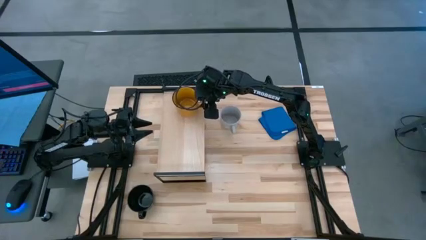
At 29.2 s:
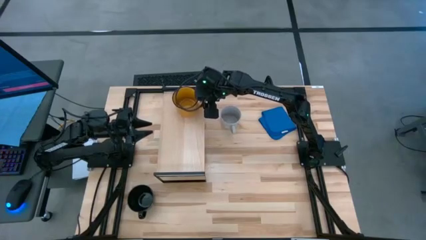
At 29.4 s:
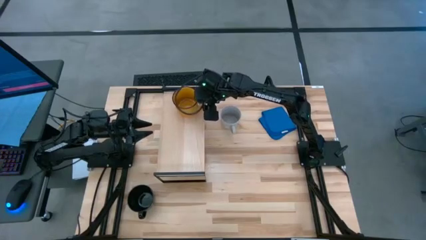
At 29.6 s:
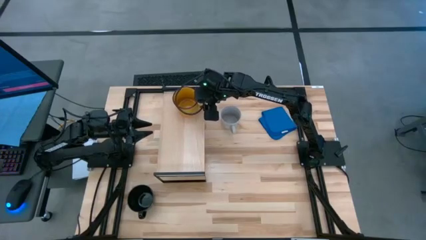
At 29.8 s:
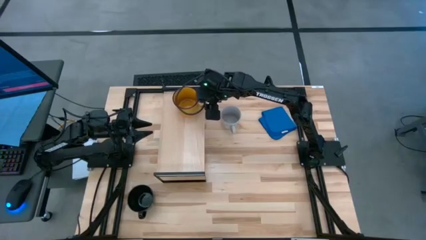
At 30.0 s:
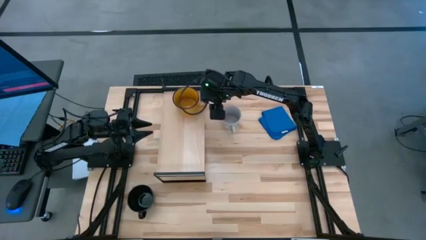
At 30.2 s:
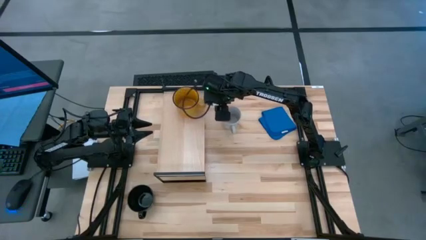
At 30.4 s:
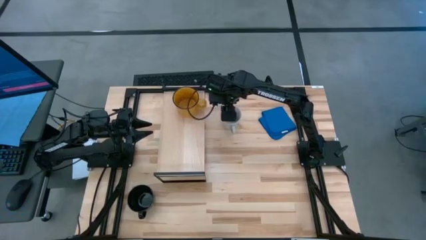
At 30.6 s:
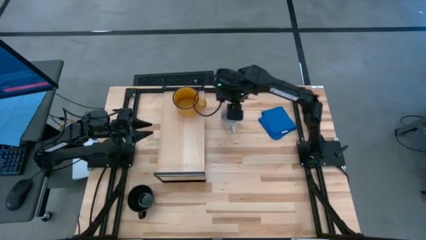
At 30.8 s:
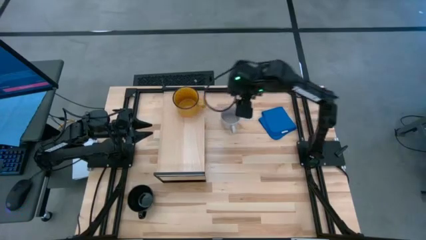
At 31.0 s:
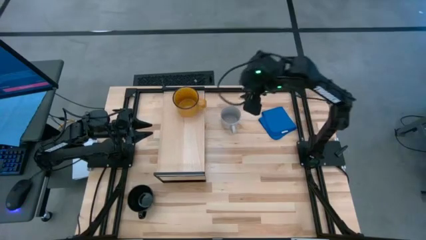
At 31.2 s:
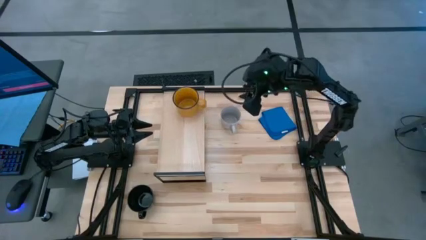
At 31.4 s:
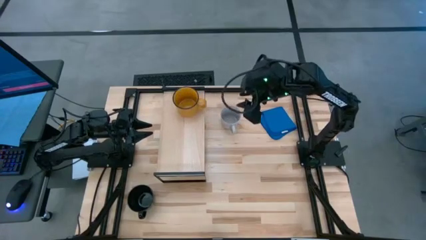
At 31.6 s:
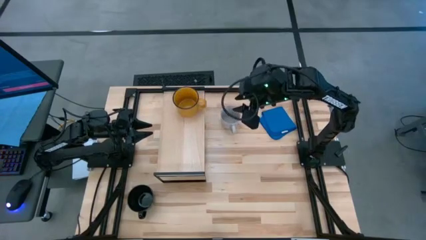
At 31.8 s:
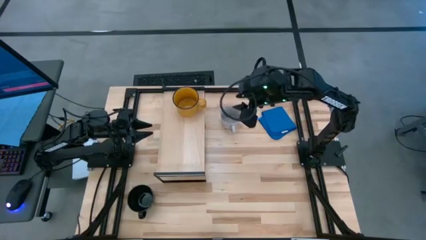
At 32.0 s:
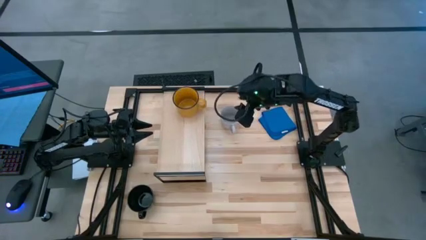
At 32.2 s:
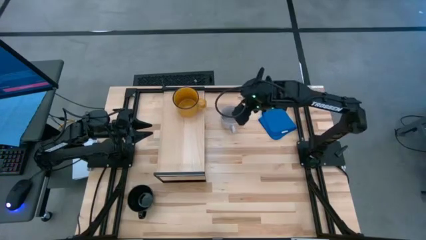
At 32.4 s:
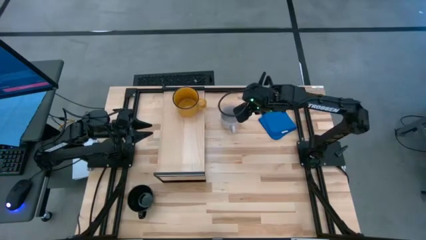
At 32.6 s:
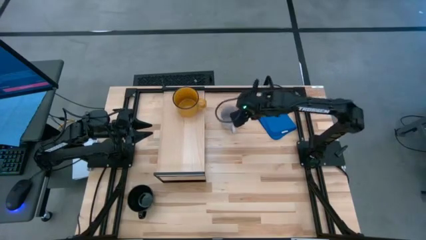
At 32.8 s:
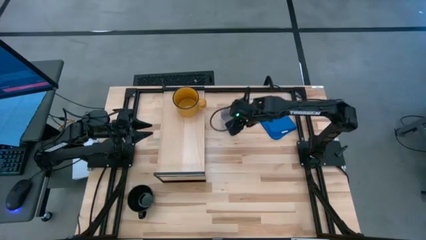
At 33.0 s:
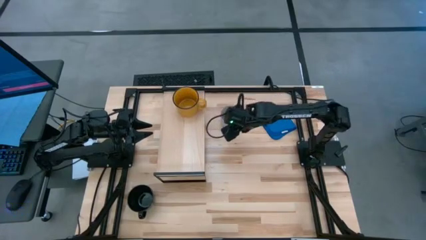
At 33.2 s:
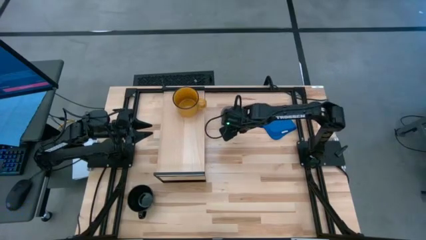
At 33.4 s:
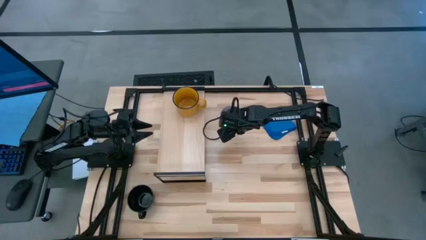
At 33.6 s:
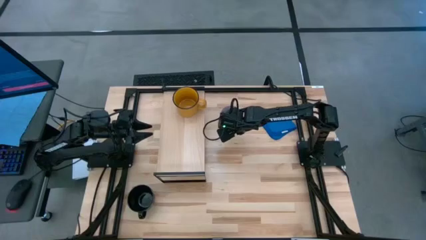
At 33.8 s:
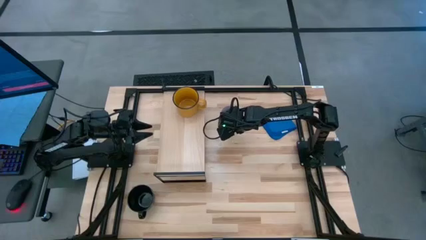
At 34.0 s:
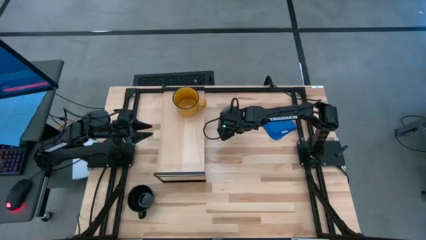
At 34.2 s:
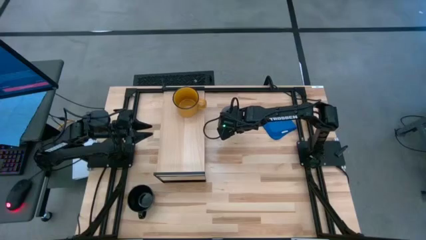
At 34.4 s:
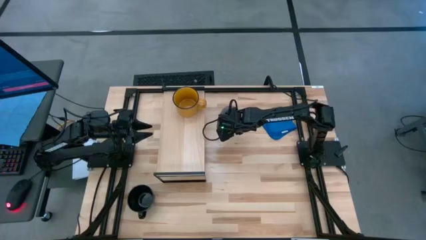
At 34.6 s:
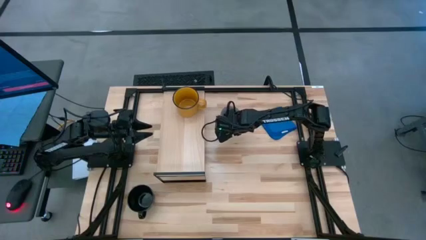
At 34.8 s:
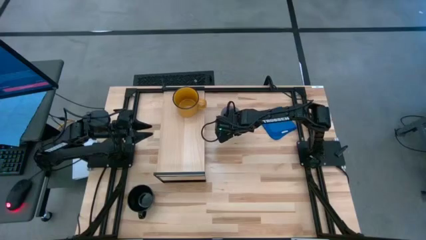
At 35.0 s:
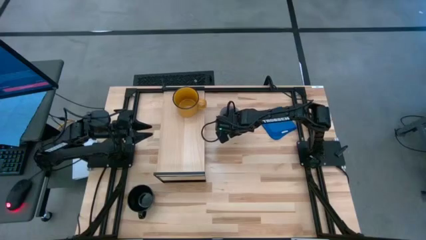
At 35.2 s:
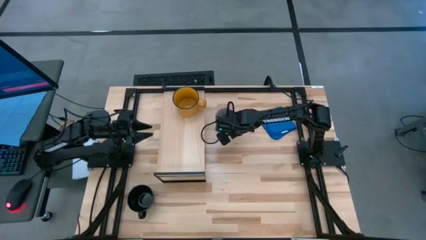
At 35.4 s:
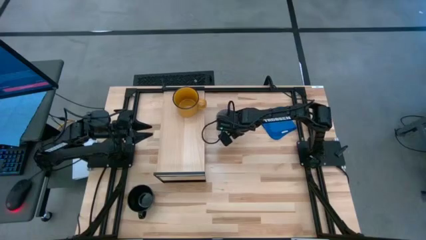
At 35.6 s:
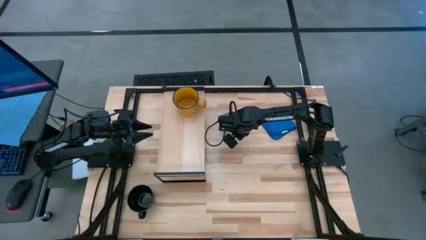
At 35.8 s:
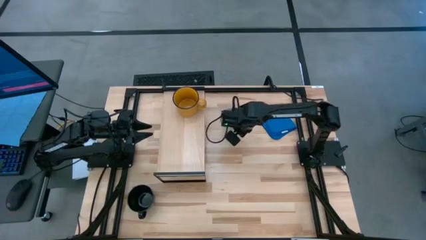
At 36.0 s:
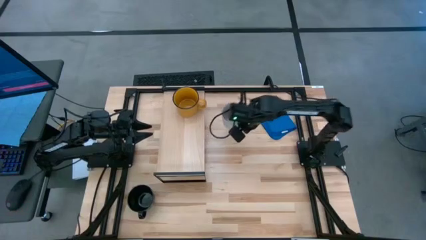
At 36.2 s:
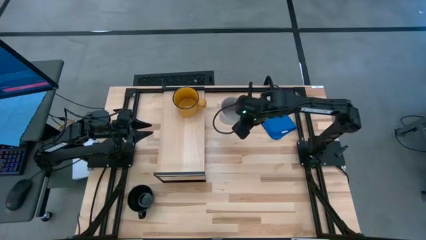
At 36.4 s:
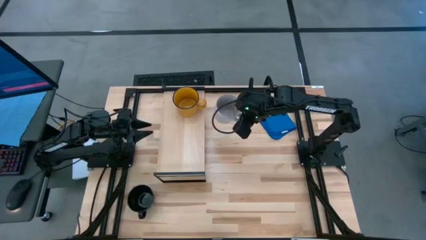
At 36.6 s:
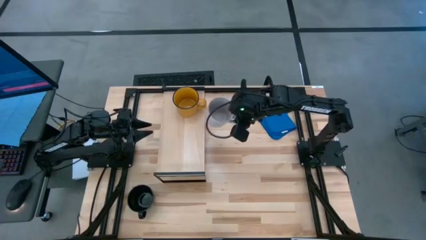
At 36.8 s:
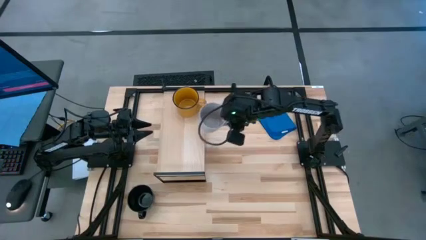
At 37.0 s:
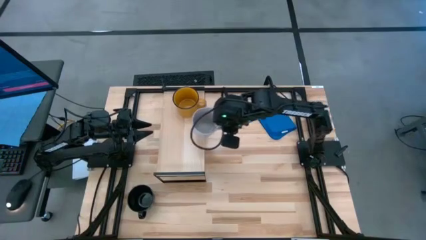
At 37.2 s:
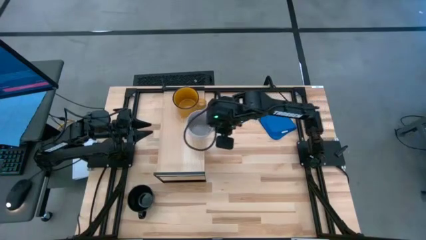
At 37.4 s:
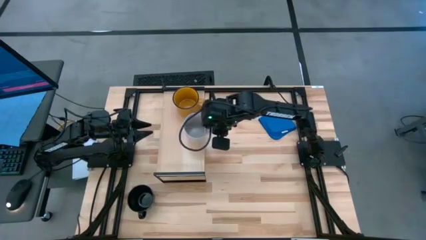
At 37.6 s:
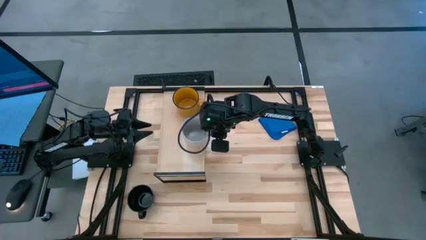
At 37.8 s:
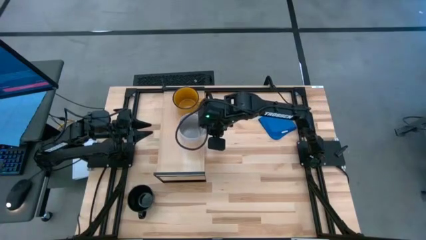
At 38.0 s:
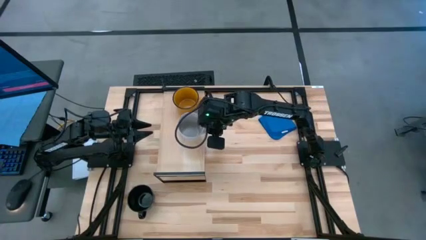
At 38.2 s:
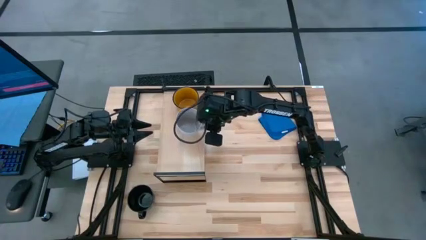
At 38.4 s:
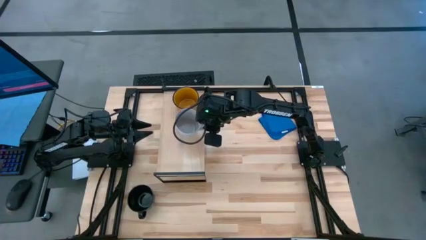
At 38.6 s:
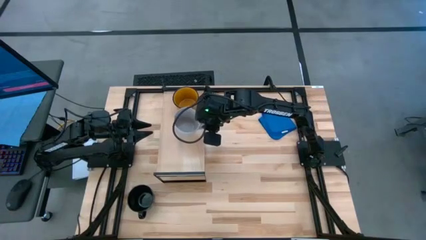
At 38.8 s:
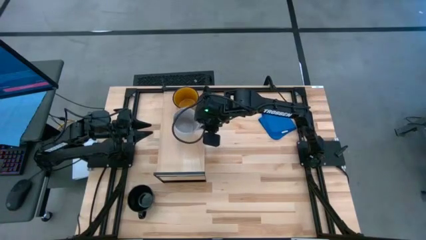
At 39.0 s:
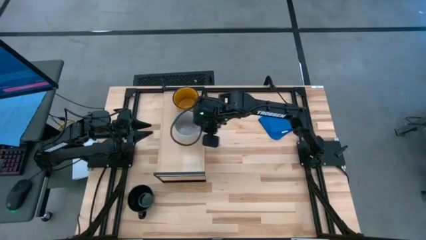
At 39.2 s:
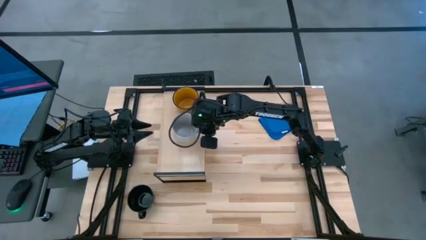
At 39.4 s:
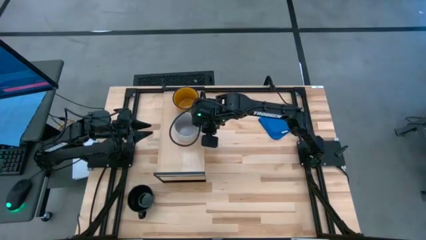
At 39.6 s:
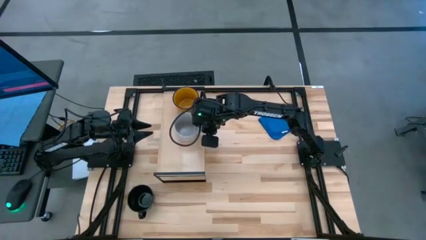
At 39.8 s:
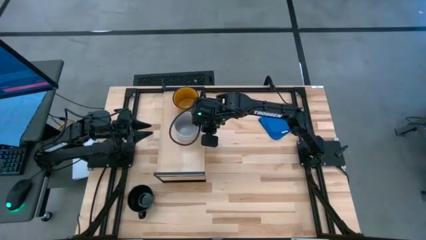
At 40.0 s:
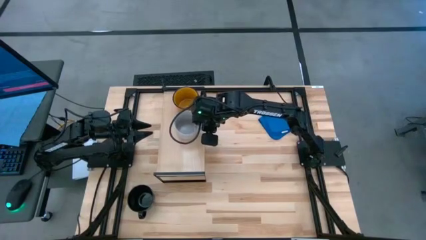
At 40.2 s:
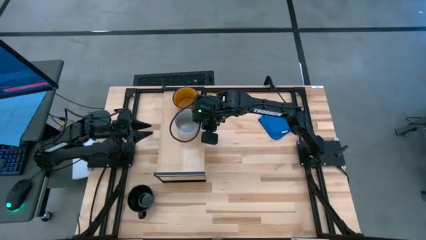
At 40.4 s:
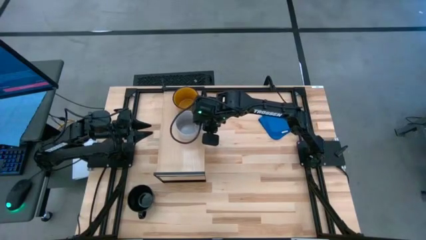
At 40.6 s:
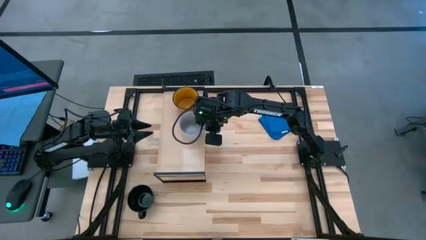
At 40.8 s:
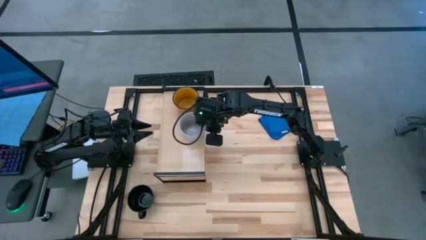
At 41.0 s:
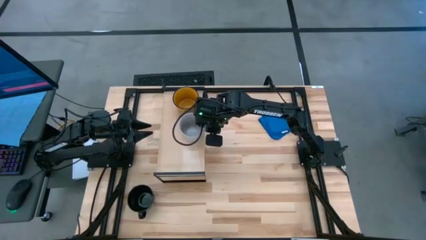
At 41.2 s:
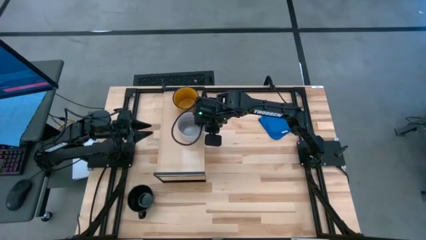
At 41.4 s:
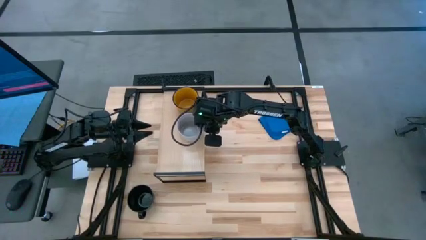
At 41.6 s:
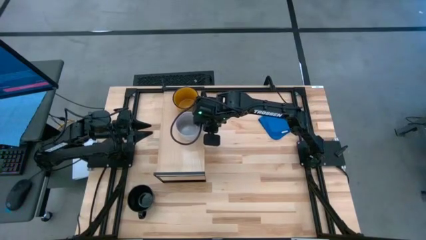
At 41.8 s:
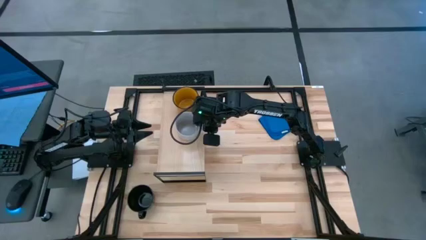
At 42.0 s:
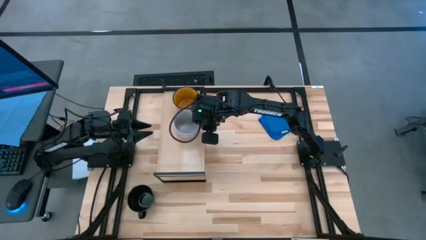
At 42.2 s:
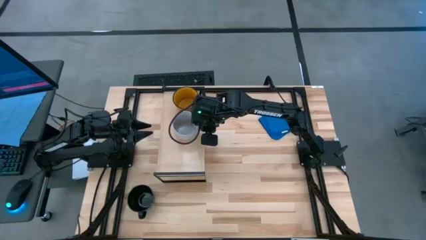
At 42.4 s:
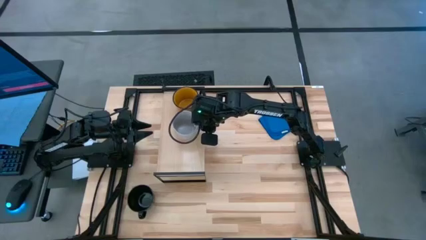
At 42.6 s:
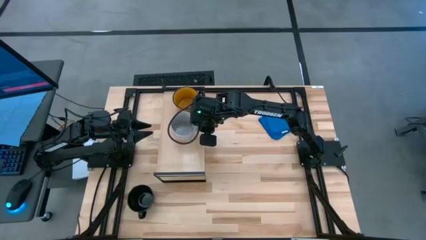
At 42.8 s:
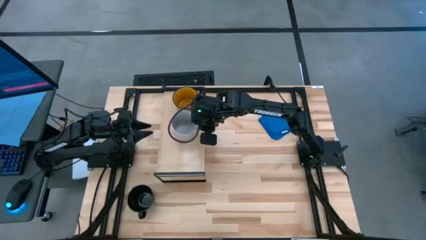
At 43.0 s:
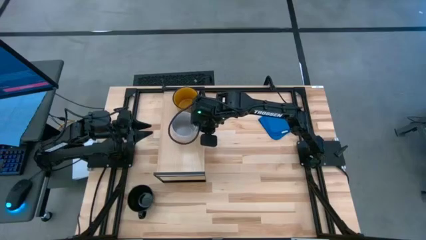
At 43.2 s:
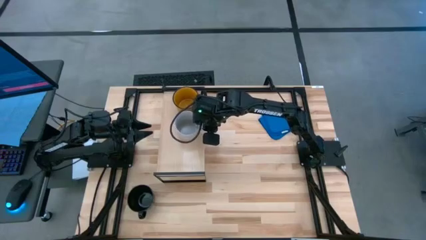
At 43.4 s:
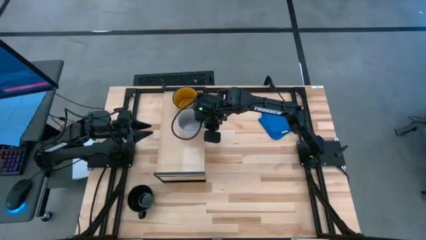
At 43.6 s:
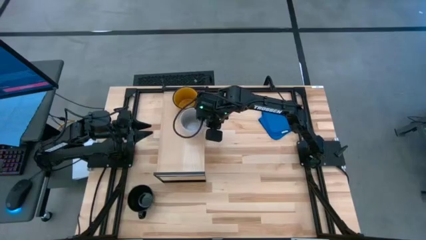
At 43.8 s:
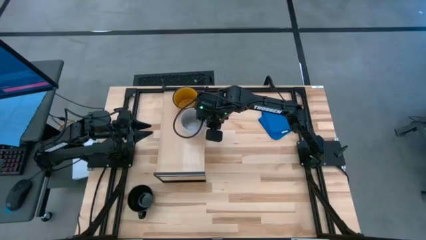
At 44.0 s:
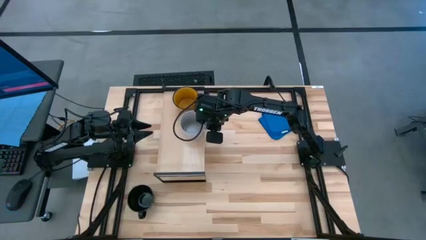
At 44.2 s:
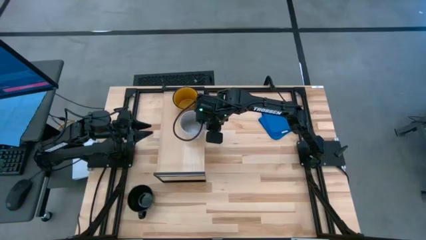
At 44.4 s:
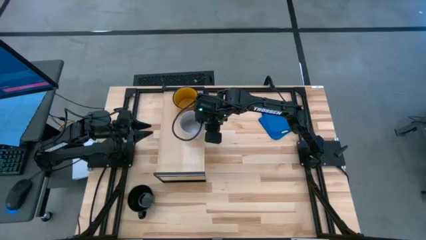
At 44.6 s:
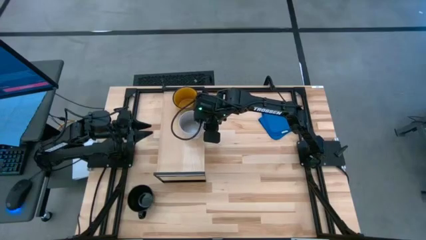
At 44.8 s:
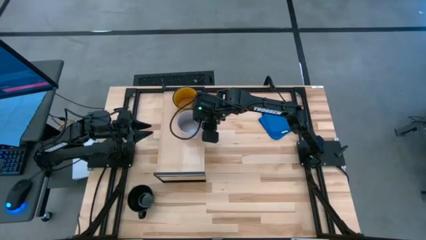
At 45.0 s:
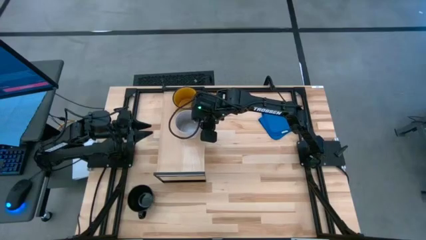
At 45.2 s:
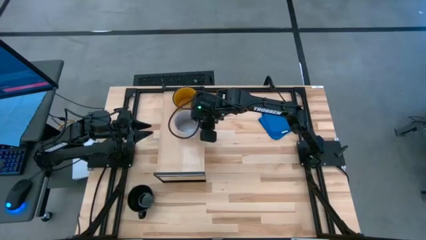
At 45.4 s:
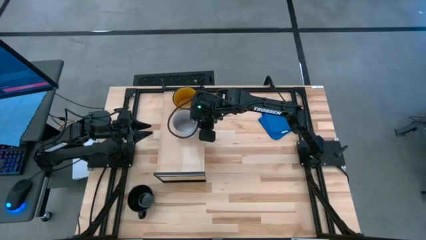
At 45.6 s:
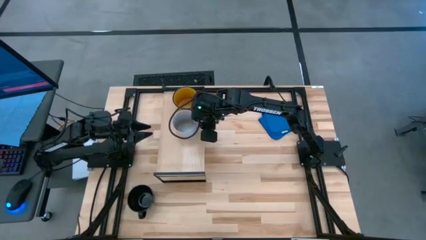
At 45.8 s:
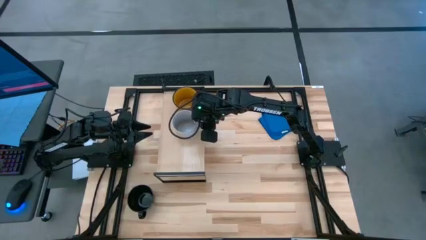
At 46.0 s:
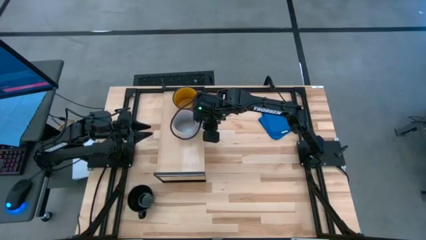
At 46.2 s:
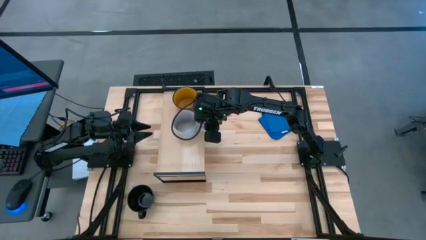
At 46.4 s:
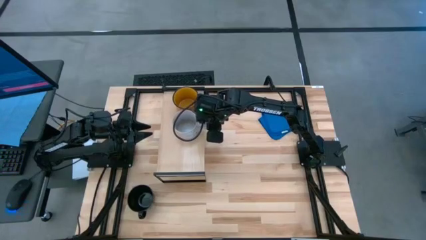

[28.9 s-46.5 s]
Task: Stack small to large cups/mugs on shelf
Put the gray mug on the shelf
